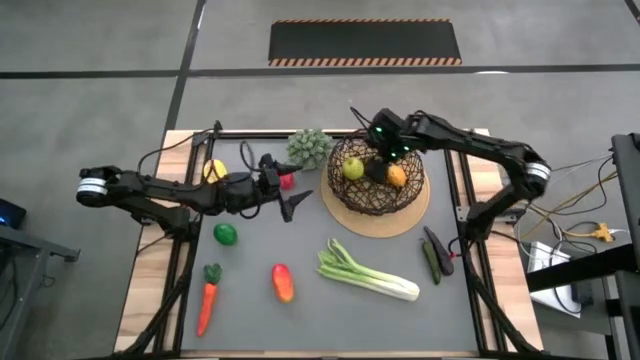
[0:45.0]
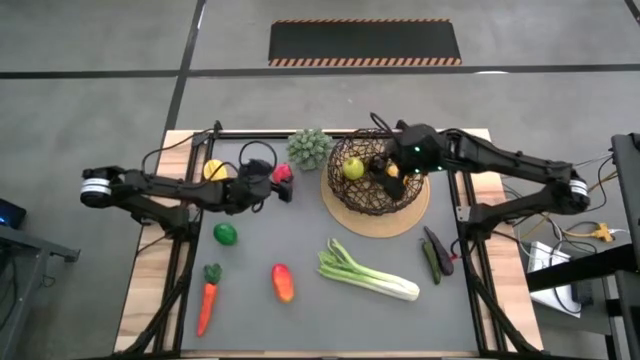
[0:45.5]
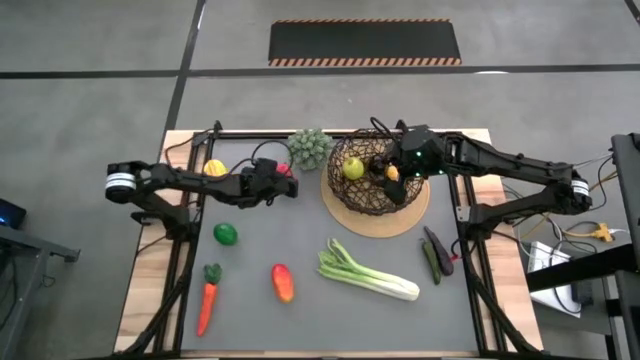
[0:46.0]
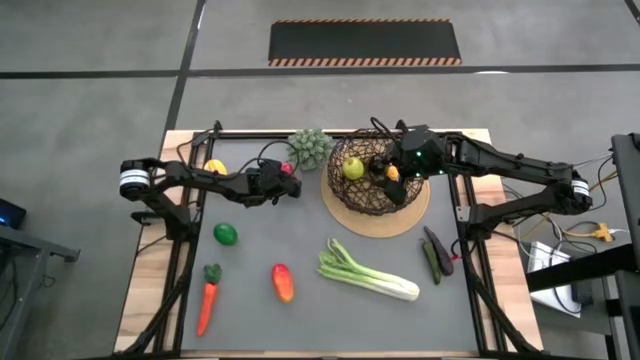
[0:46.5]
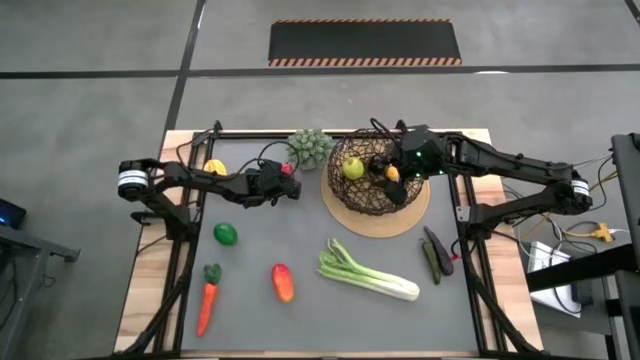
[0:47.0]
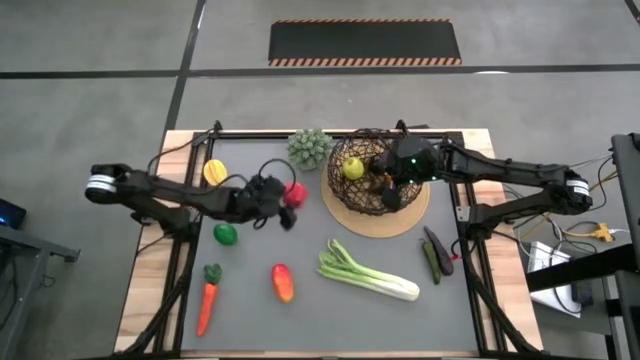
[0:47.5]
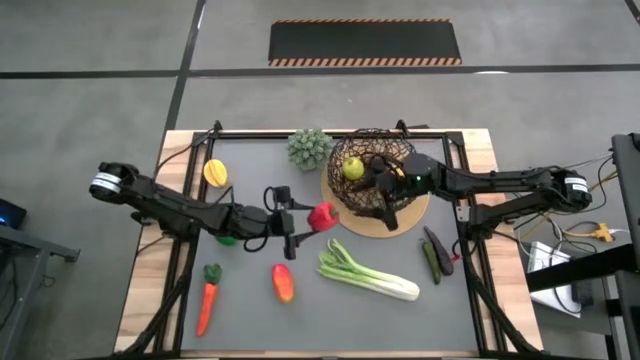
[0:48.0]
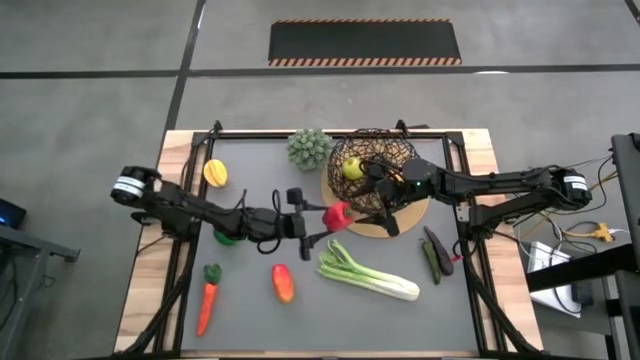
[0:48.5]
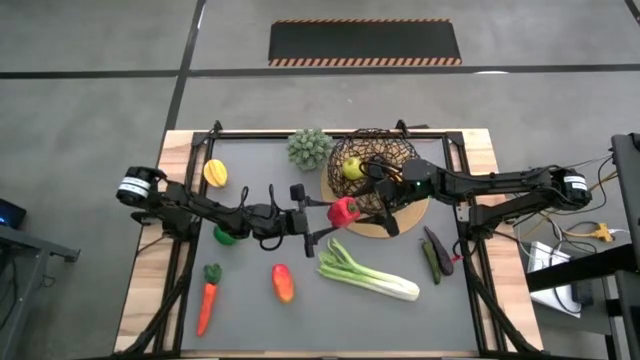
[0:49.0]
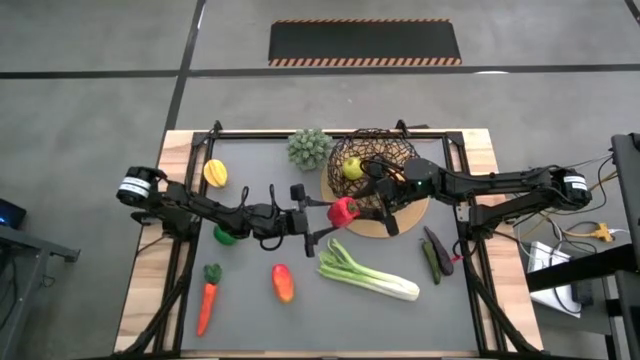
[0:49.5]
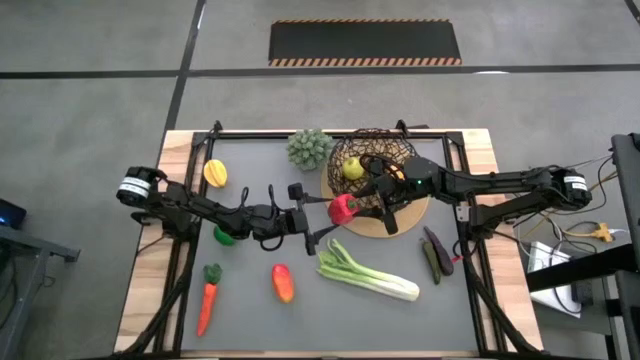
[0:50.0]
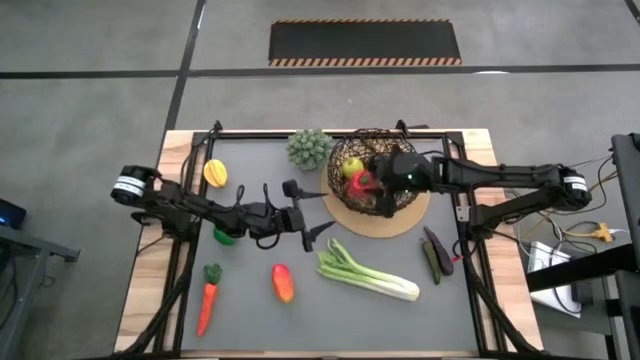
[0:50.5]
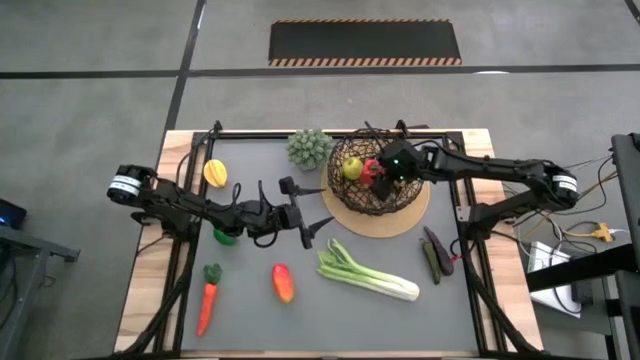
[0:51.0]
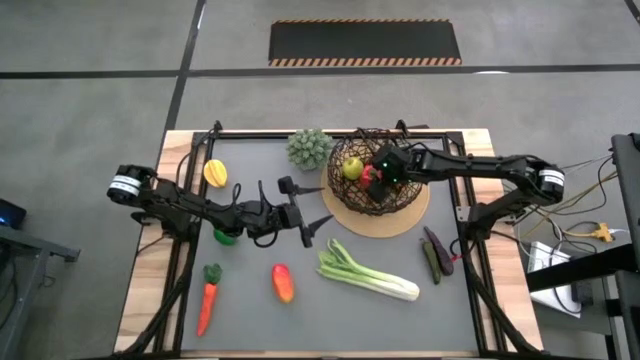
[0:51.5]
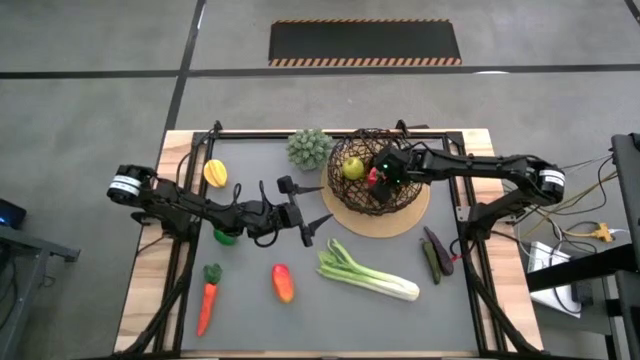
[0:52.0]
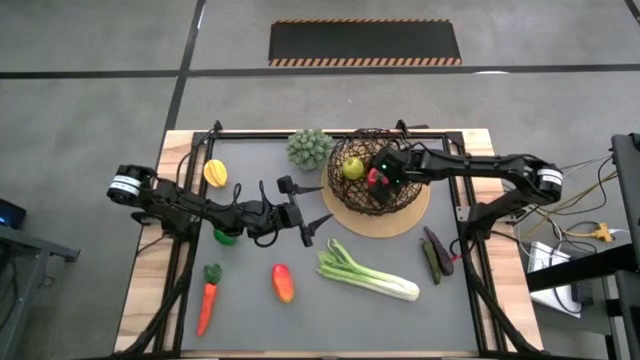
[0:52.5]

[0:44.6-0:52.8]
Task: Build produce basket
Put the red bell pepper into the black wire basket

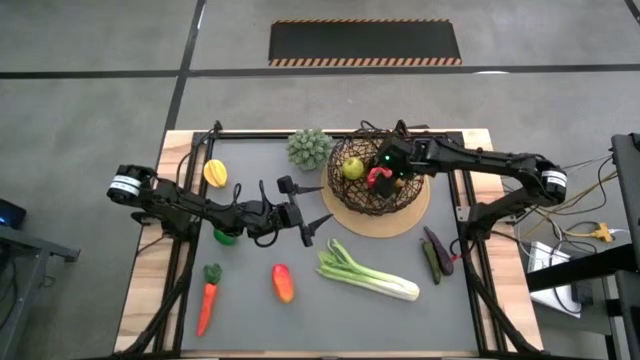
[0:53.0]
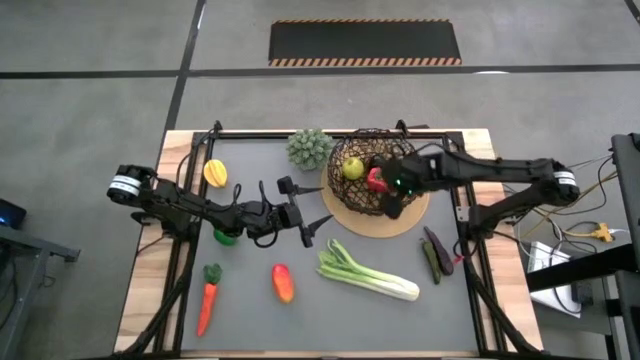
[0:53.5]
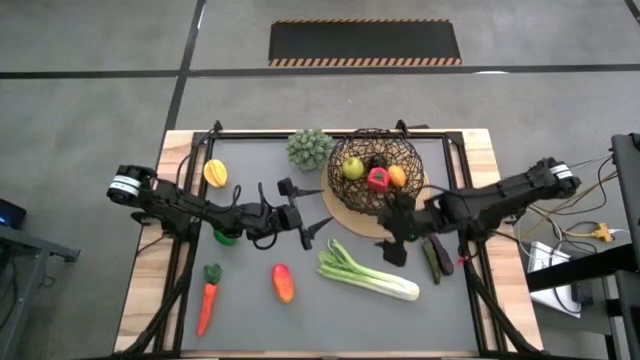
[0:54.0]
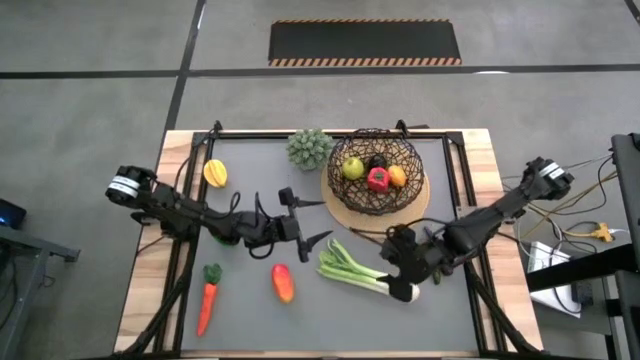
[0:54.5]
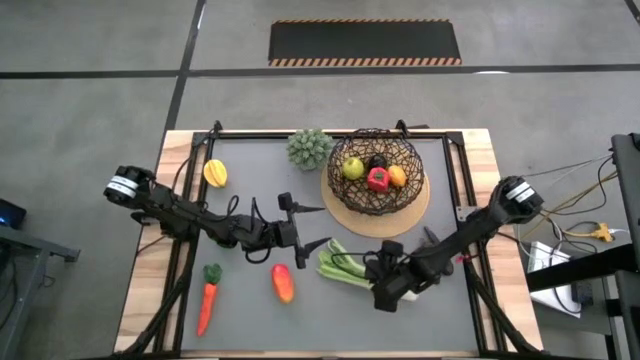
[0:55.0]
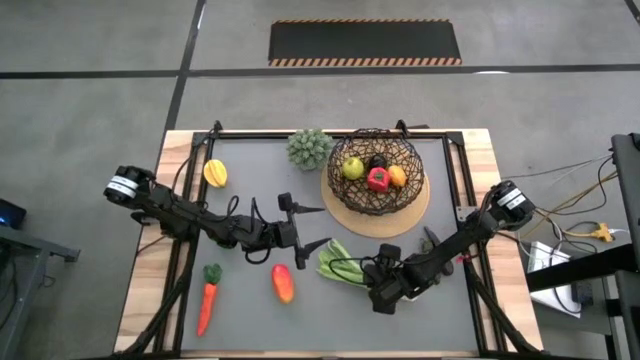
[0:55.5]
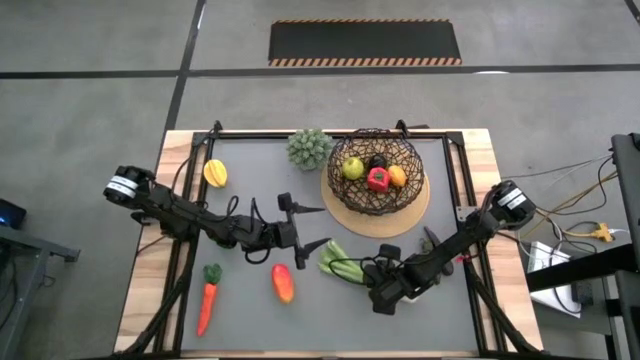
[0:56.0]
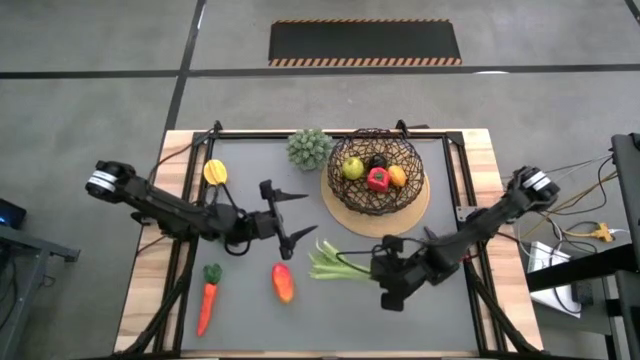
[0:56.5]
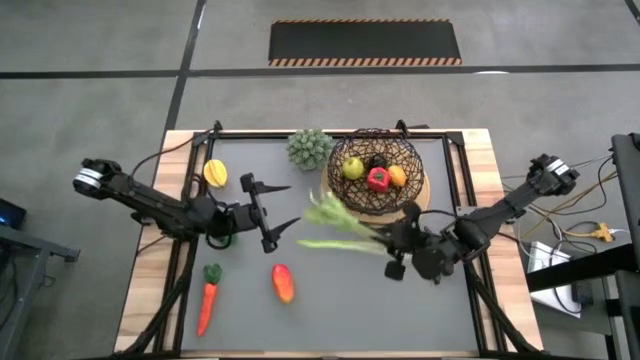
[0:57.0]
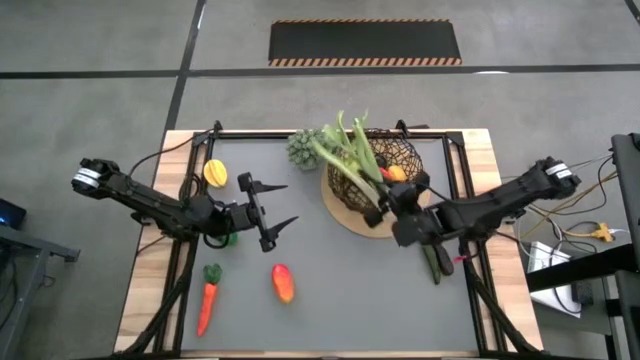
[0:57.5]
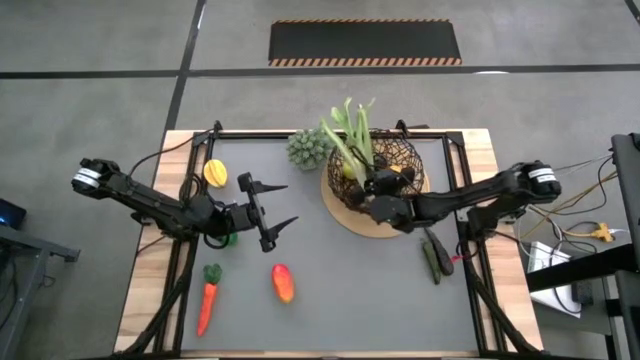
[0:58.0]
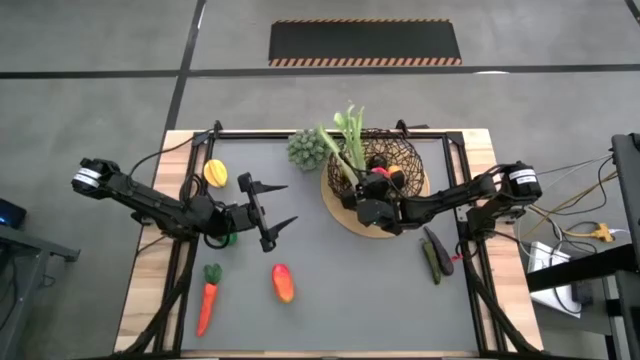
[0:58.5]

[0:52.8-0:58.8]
Put the green celery into the black wire basket

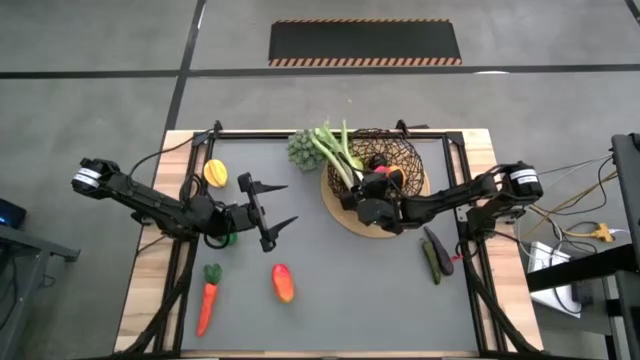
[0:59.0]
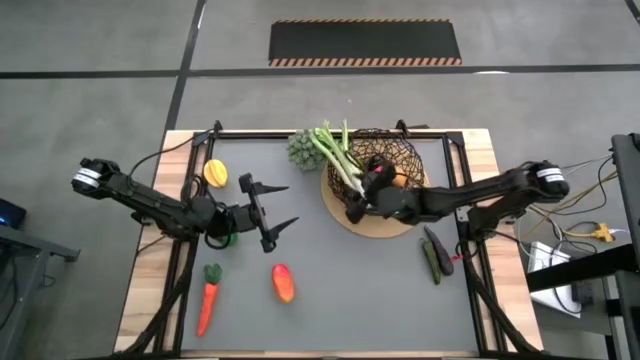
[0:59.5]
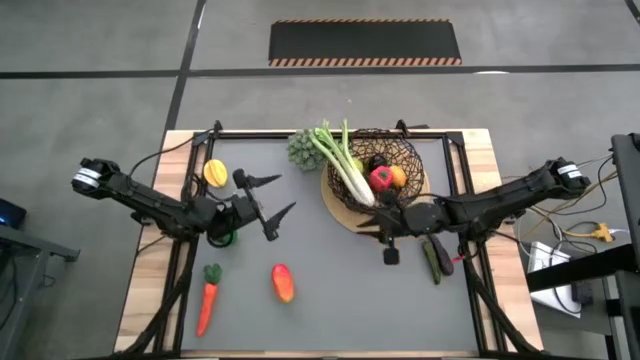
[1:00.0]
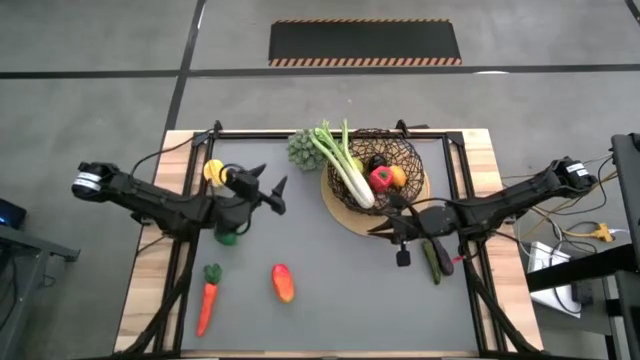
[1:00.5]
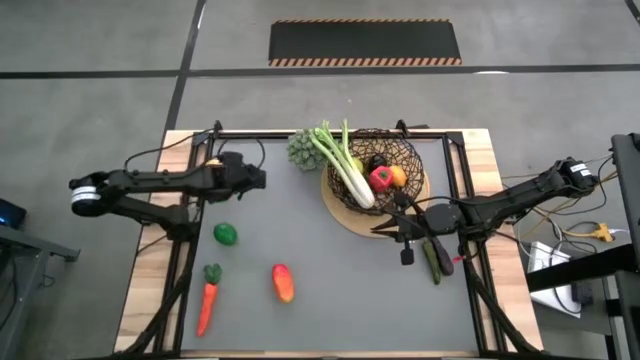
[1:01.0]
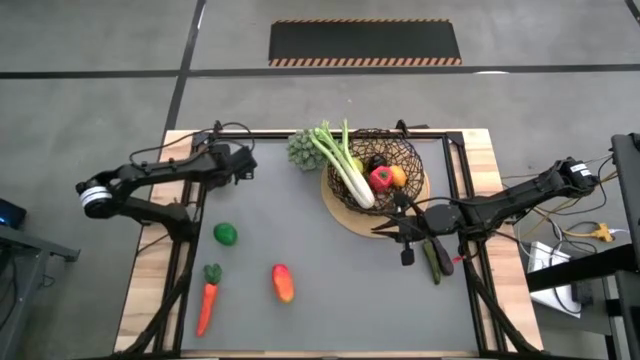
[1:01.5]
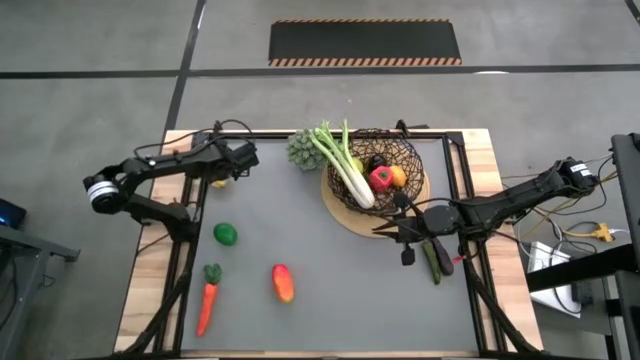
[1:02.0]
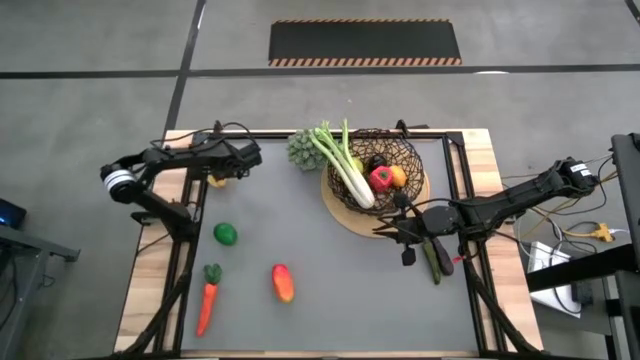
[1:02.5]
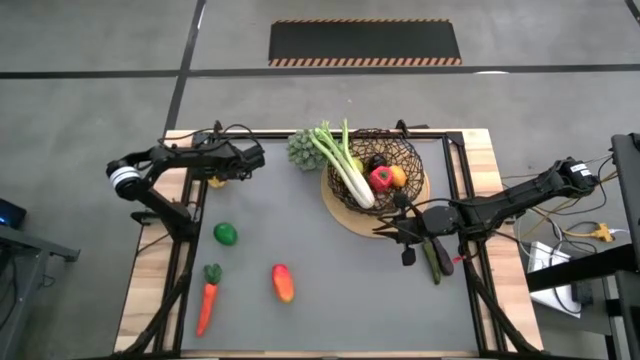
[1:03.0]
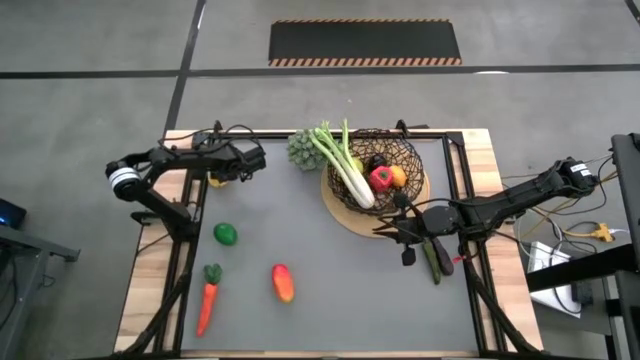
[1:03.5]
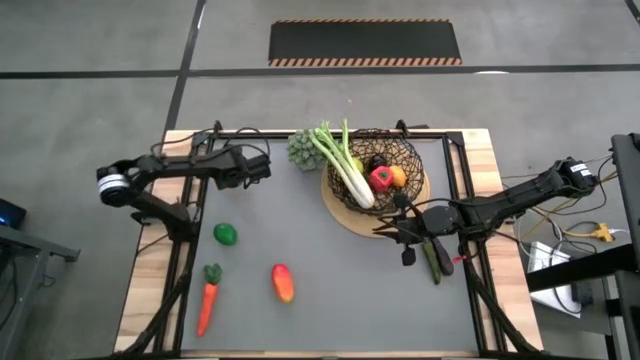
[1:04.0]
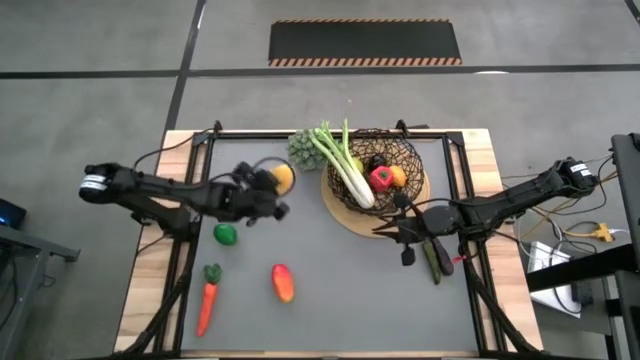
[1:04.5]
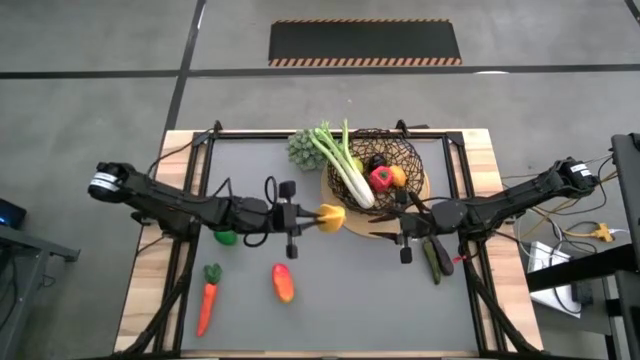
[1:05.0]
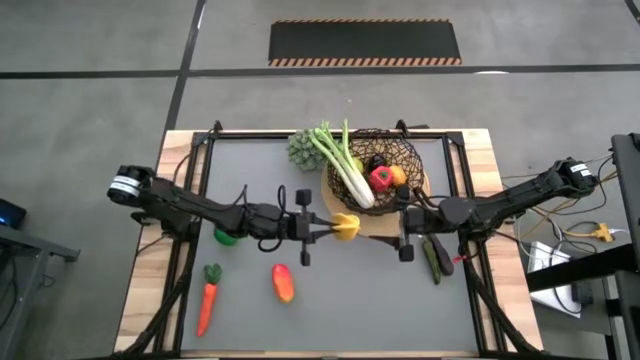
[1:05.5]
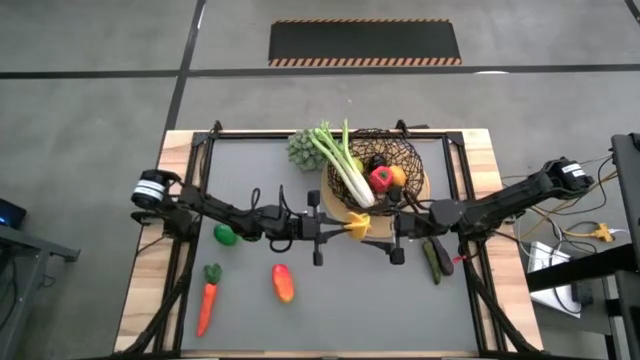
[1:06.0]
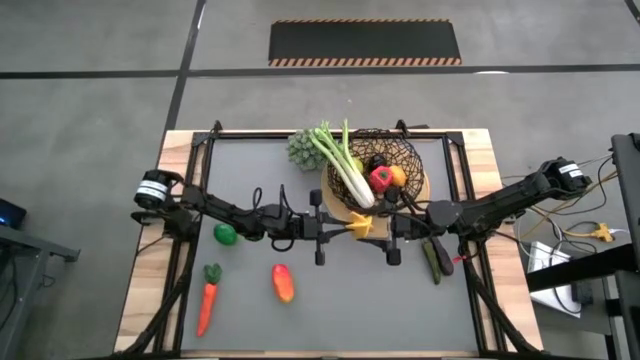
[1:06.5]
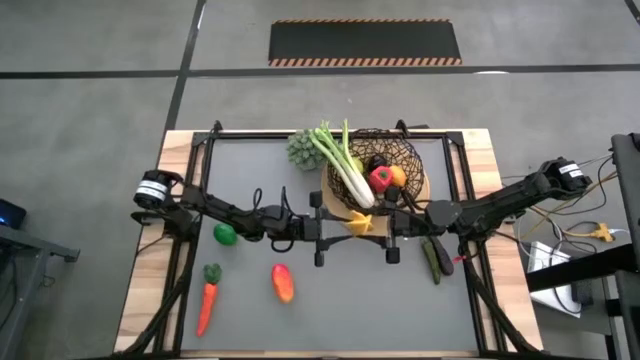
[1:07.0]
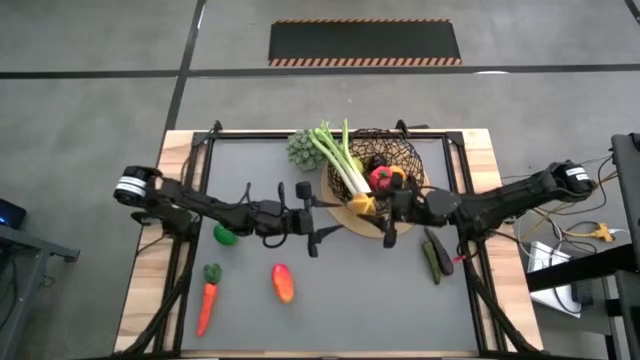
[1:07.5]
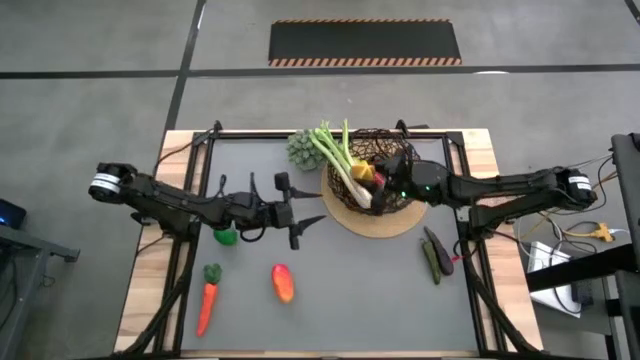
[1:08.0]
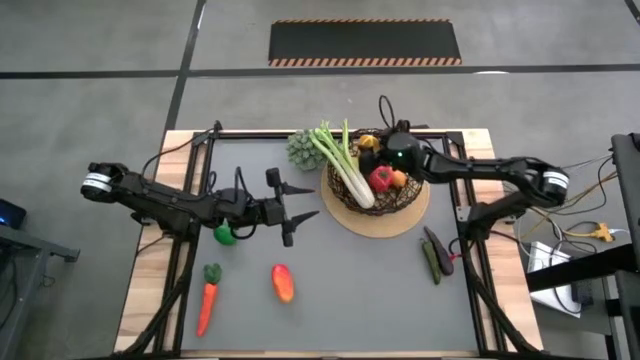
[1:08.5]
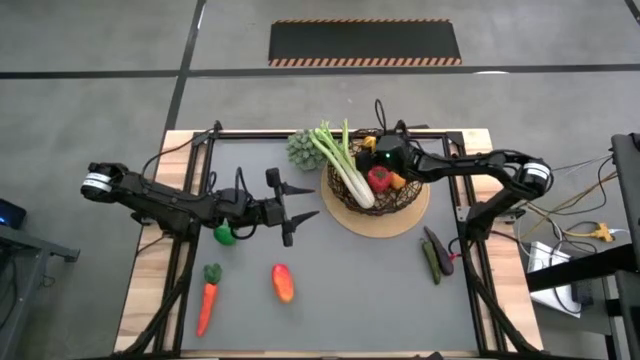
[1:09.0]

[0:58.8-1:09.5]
Put the yellow starfruit into the black wire basket
